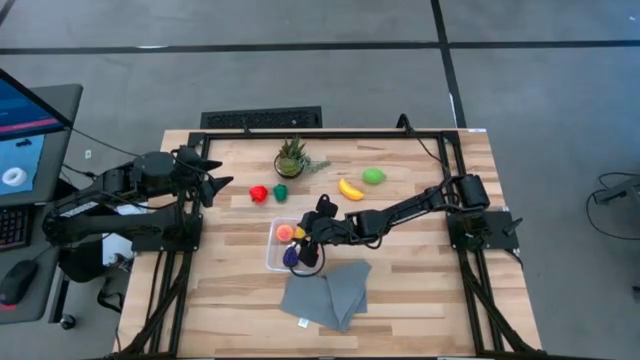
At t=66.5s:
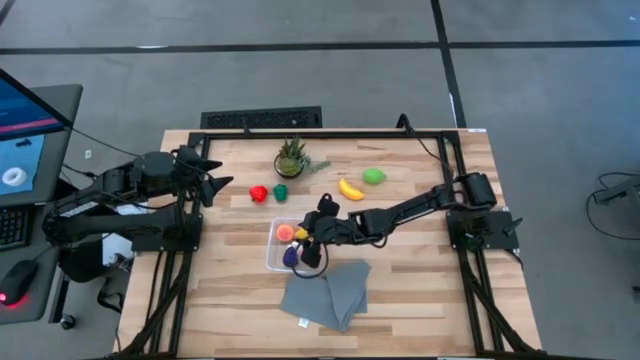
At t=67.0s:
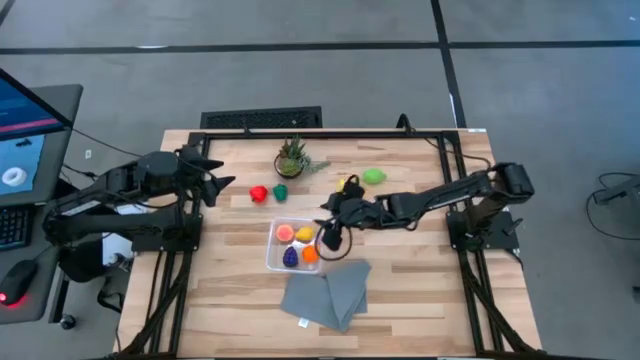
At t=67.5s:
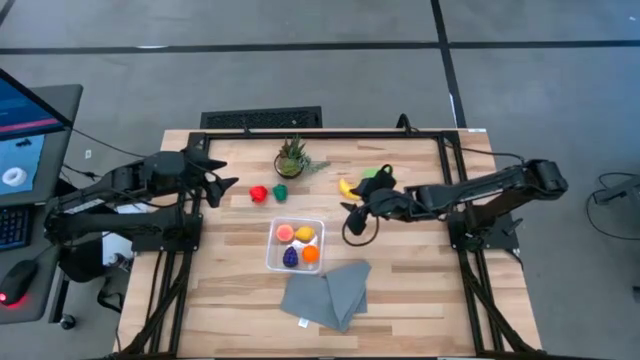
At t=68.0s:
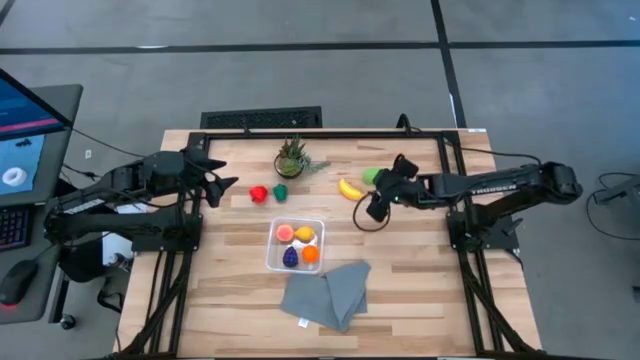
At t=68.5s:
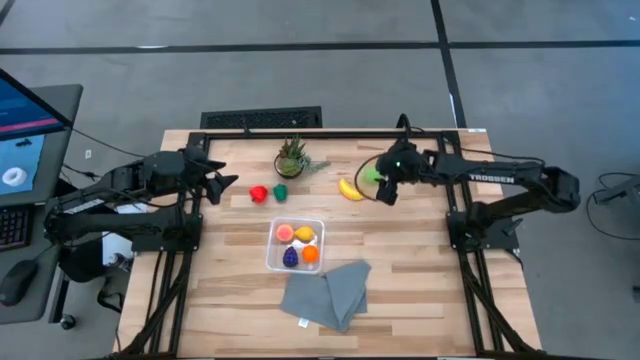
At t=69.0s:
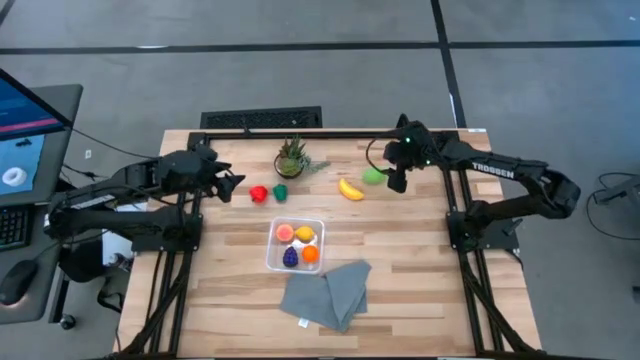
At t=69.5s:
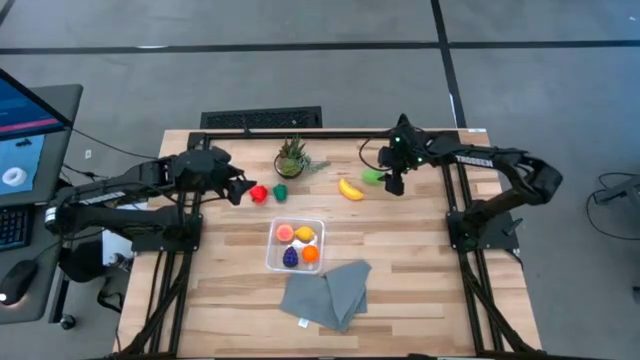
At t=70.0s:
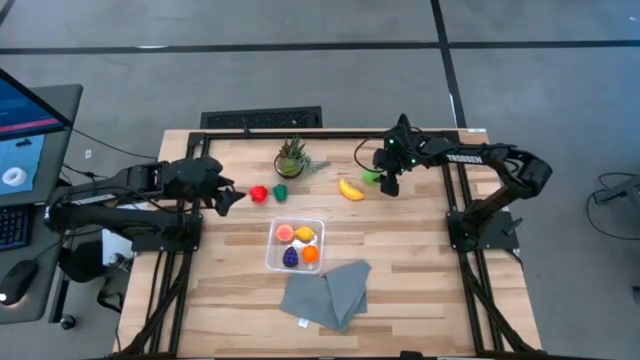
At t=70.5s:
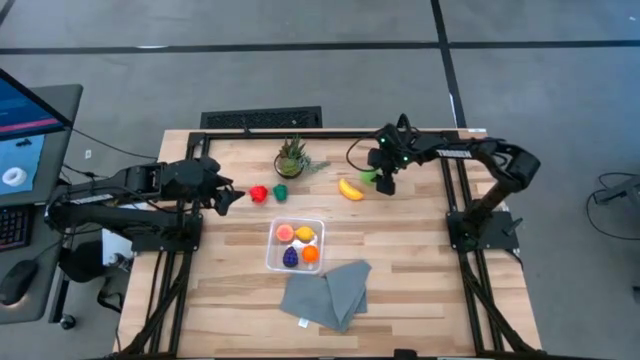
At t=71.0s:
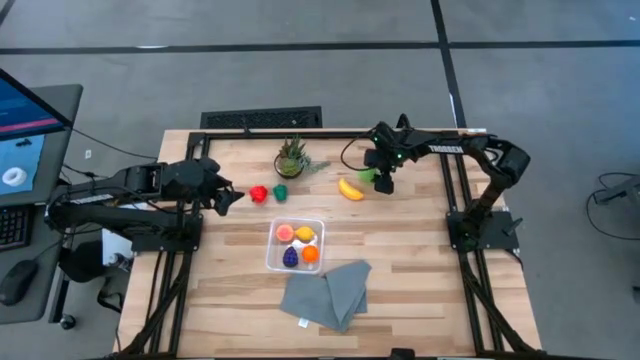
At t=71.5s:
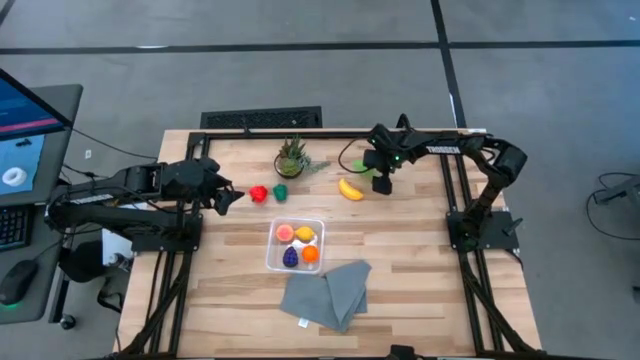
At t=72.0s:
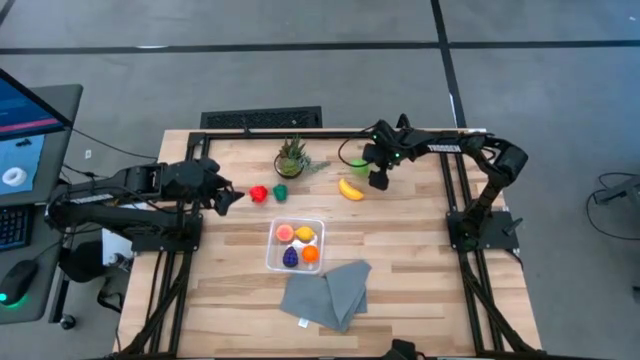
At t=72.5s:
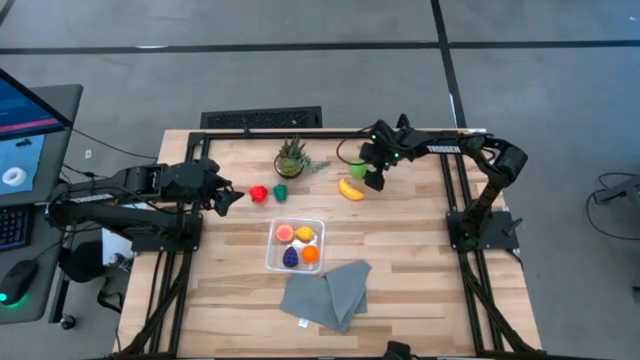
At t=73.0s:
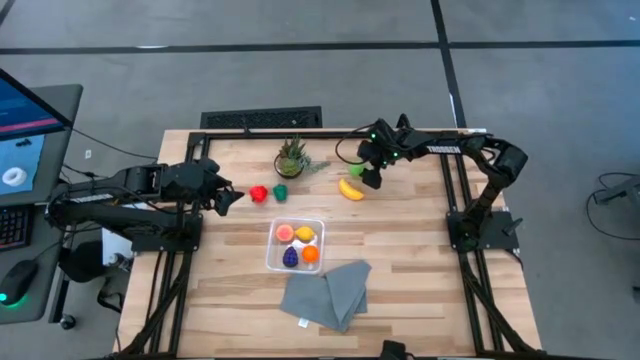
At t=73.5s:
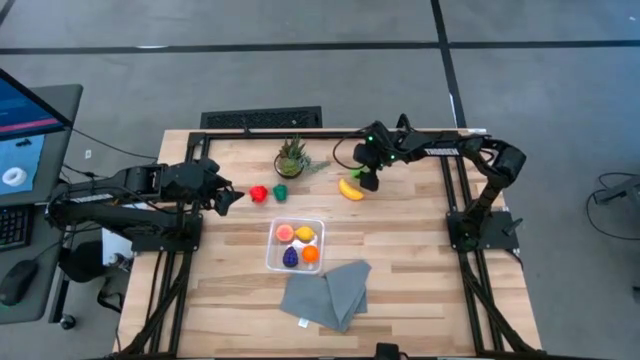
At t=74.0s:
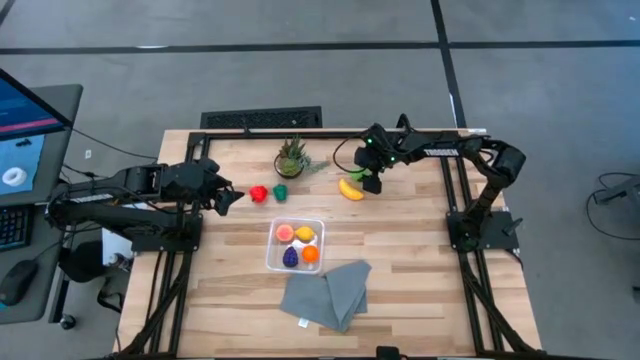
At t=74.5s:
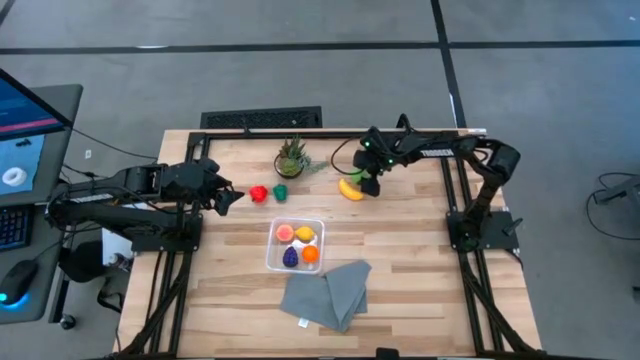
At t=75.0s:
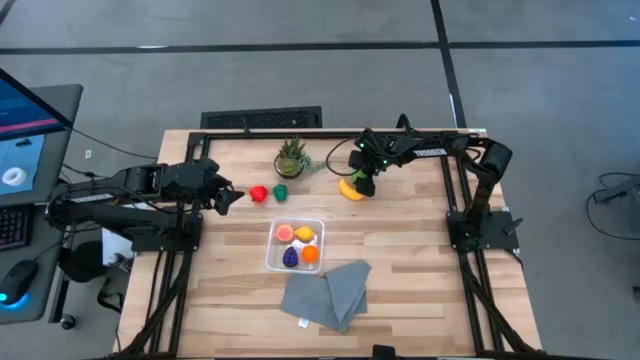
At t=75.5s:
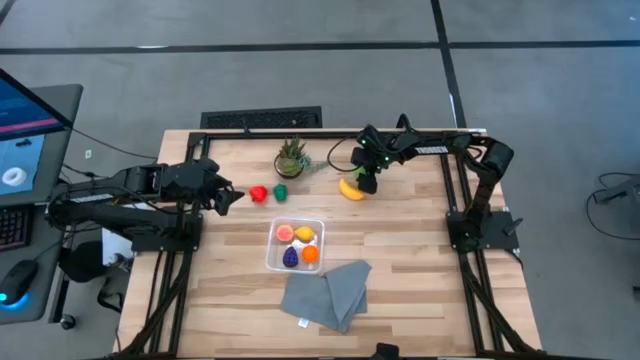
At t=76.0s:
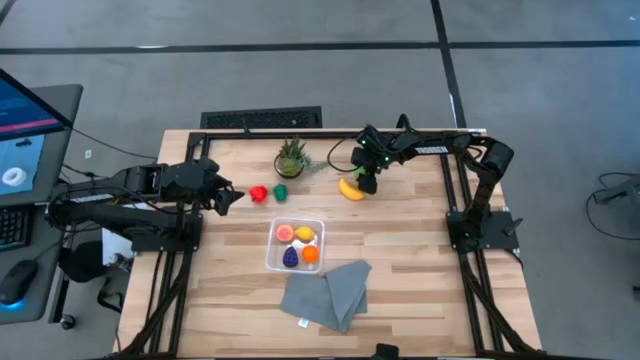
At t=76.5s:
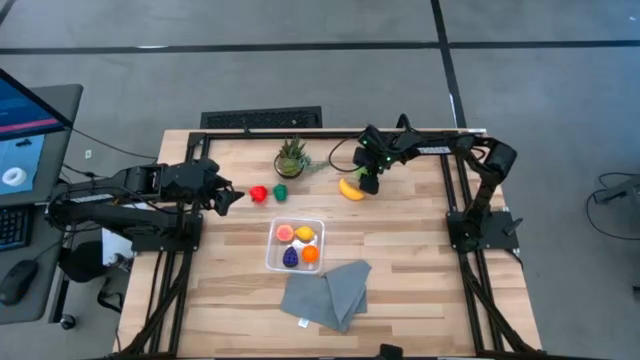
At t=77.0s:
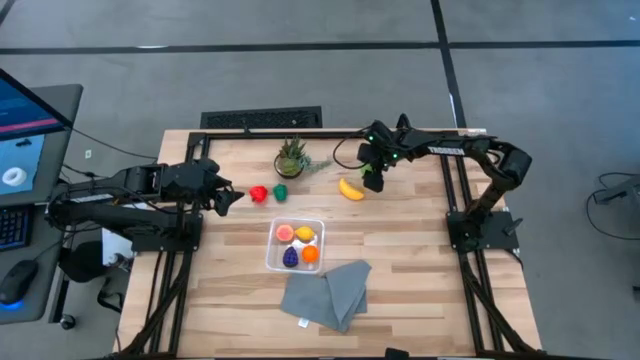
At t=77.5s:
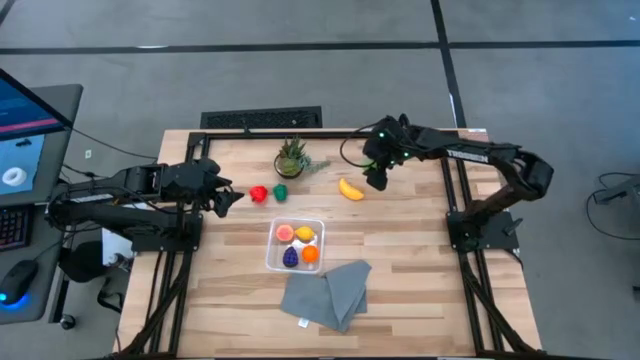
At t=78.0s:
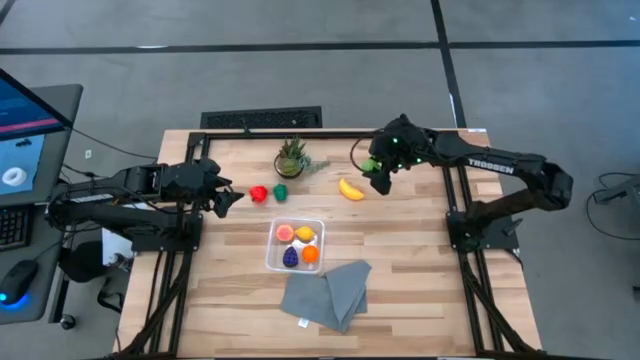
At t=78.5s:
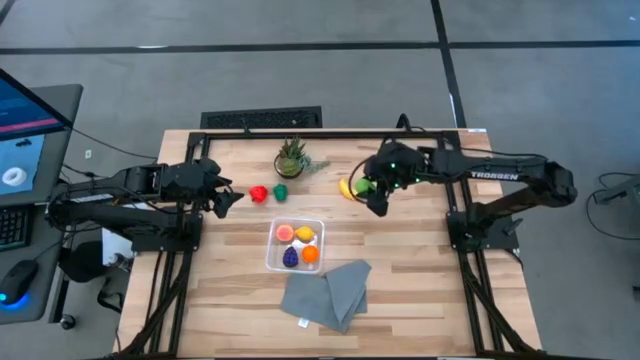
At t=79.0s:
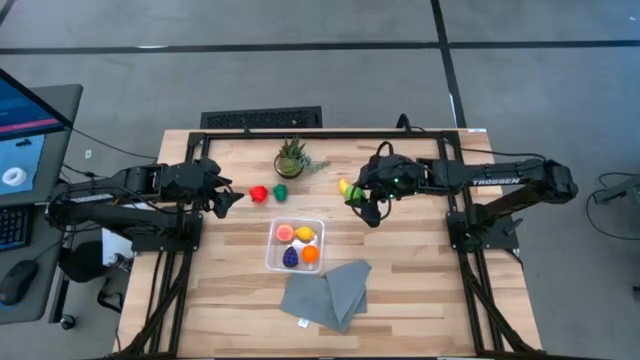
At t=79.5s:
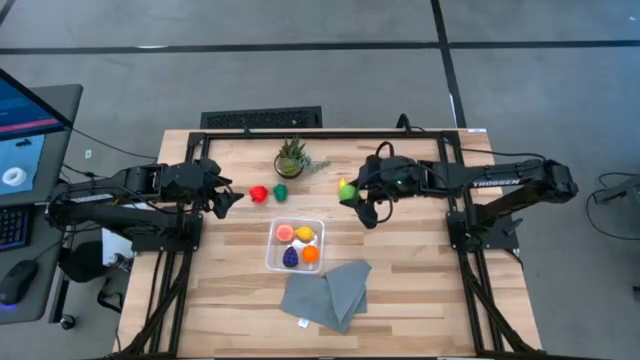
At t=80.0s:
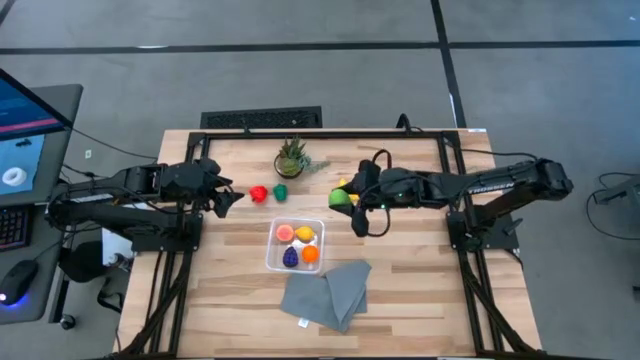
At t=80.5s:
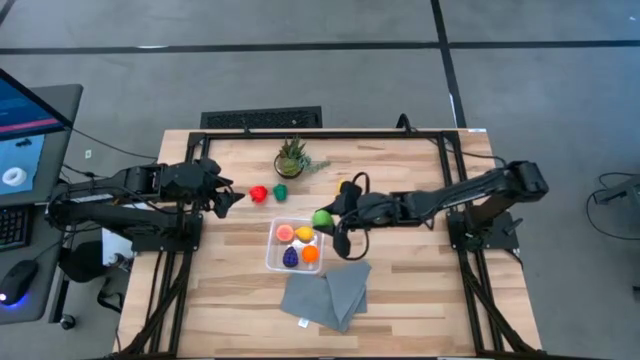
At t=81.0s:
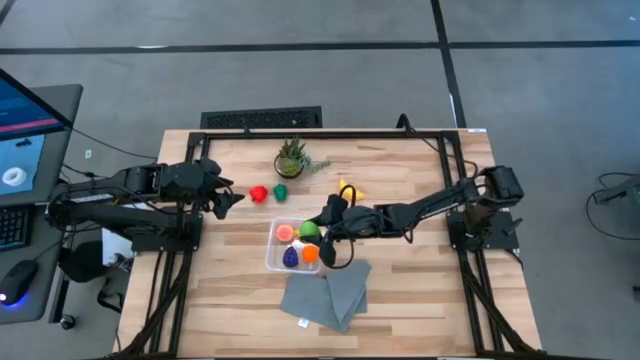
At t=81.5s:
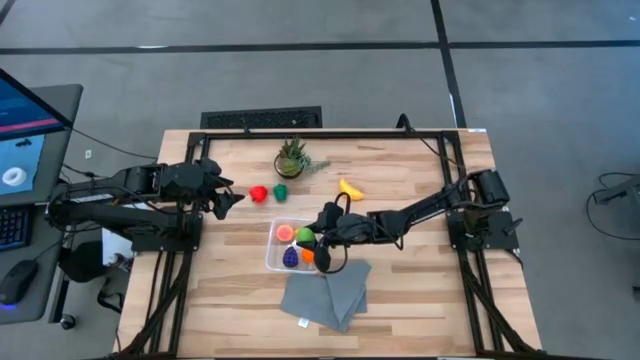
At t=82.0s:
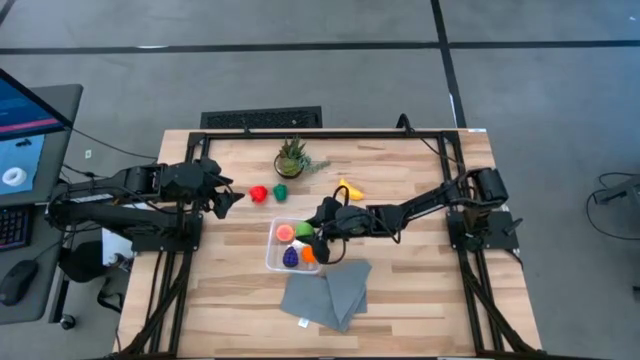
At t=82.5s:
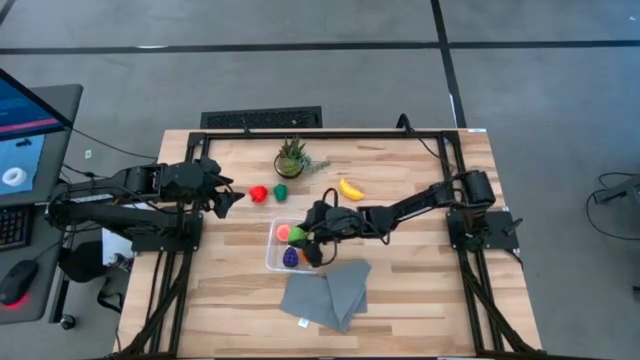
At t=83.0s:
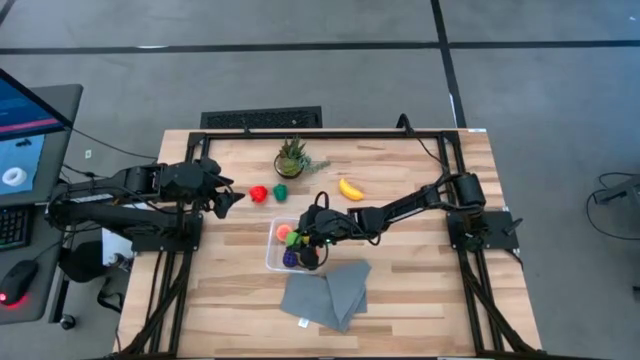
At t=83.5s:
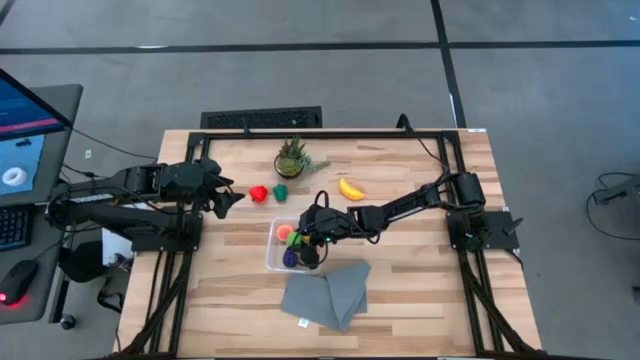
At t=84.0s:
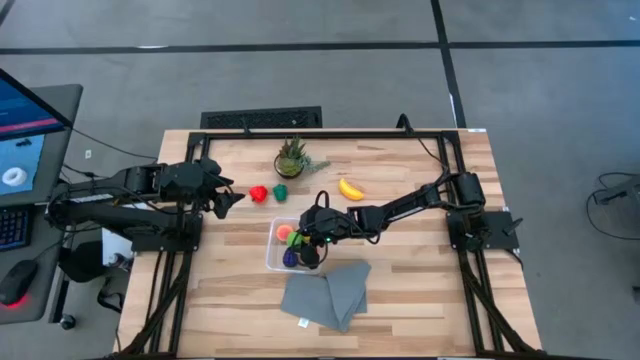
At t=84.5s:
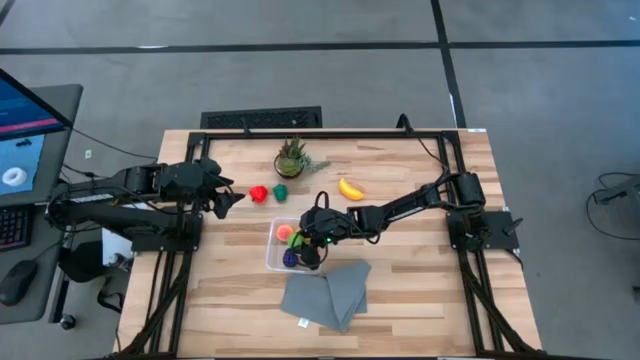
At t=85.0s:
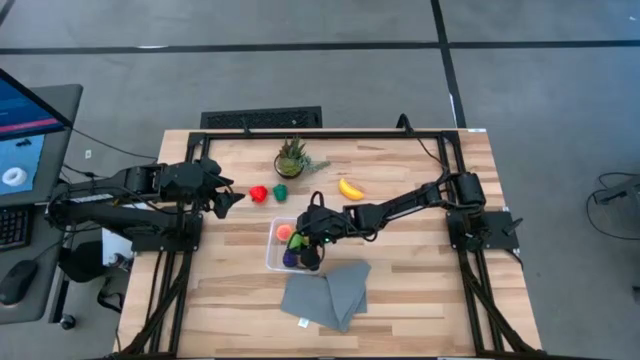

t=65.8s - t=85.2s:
Task: Pick and placing Produce into tupperware
Put the green melon into the transparent container
